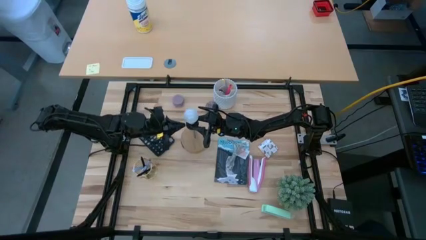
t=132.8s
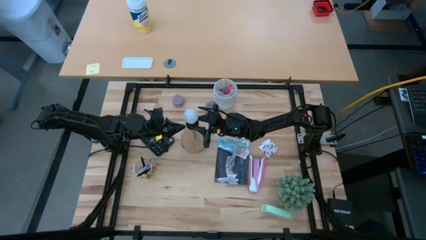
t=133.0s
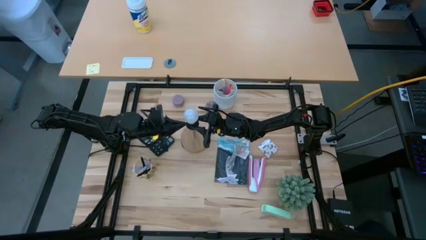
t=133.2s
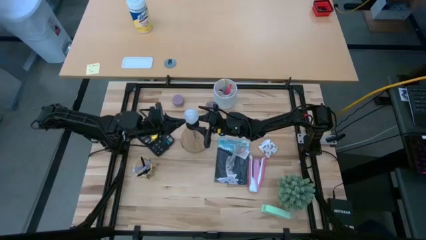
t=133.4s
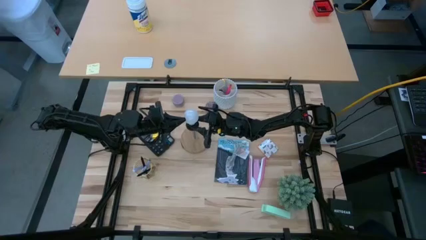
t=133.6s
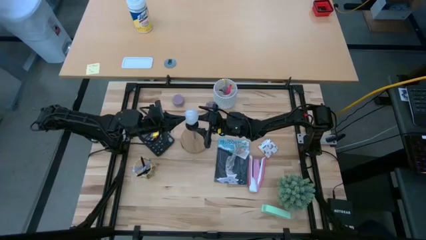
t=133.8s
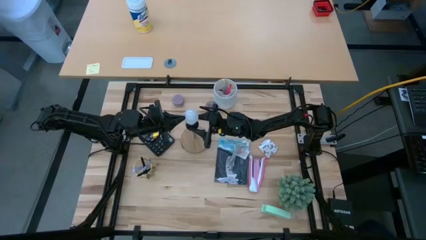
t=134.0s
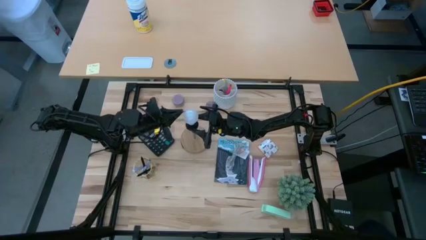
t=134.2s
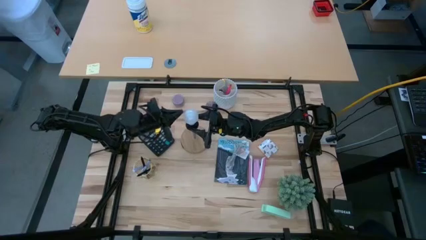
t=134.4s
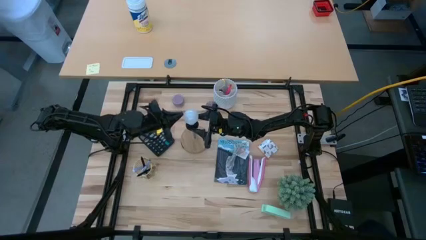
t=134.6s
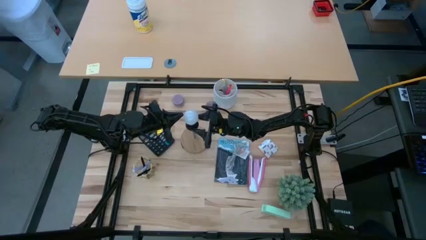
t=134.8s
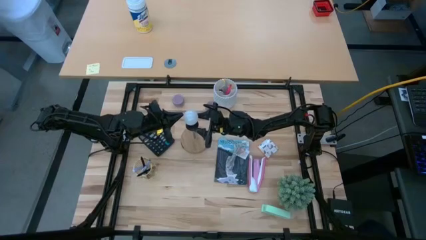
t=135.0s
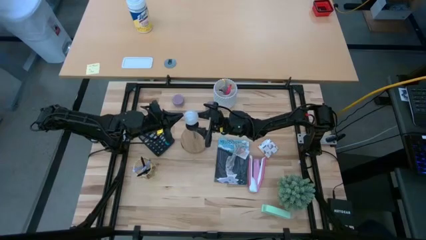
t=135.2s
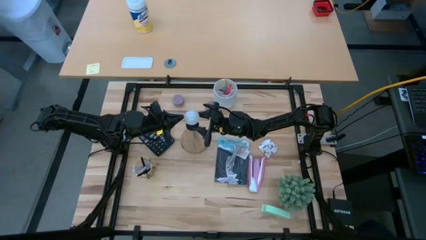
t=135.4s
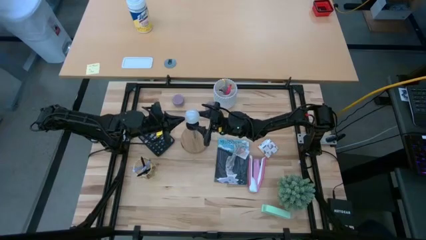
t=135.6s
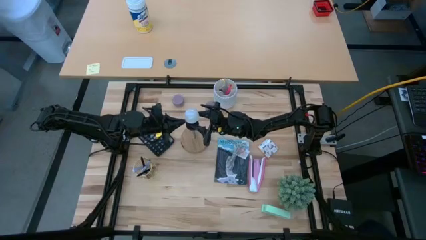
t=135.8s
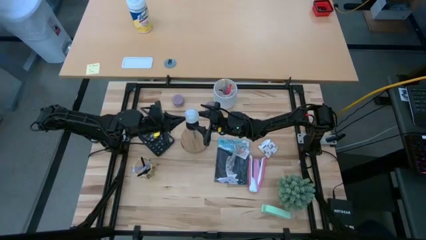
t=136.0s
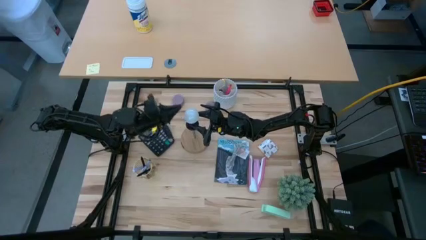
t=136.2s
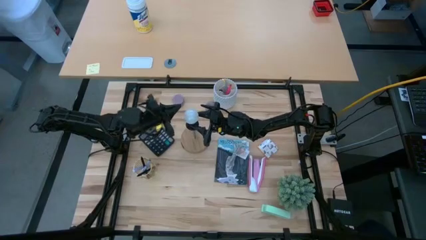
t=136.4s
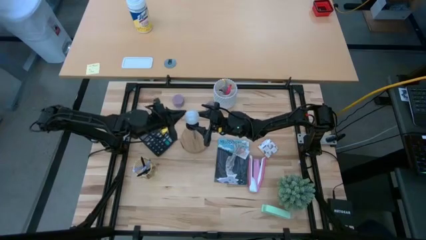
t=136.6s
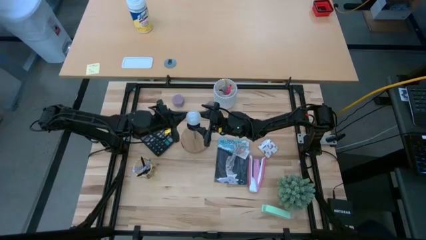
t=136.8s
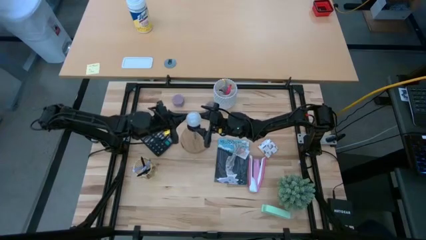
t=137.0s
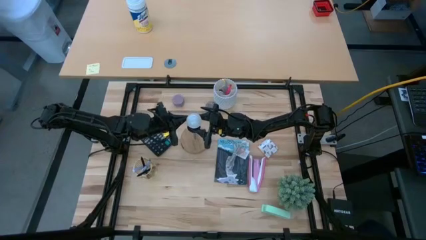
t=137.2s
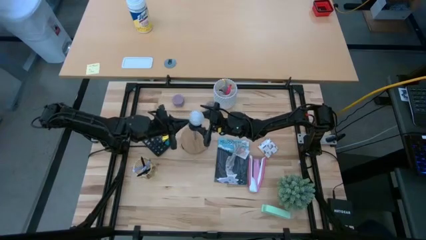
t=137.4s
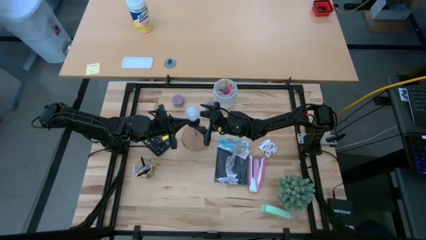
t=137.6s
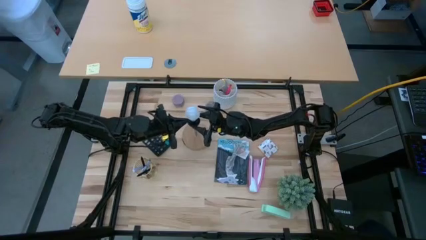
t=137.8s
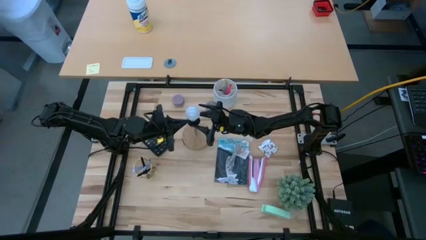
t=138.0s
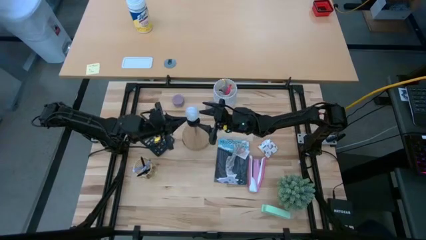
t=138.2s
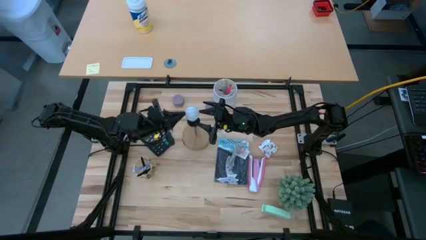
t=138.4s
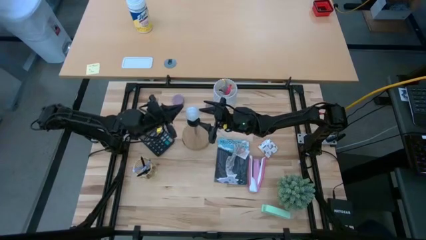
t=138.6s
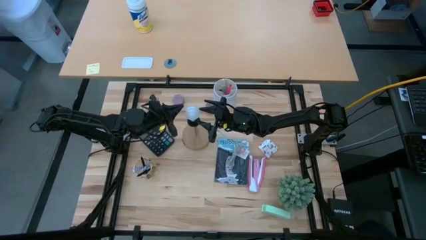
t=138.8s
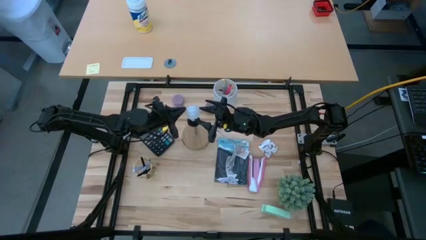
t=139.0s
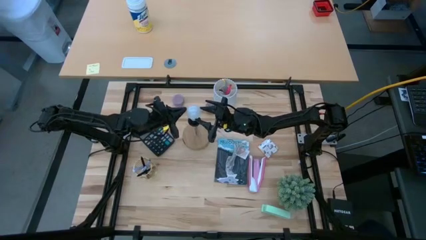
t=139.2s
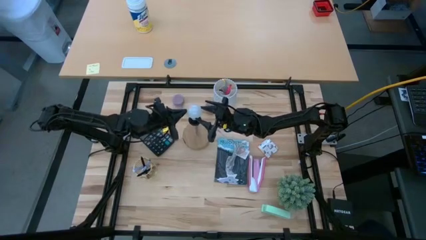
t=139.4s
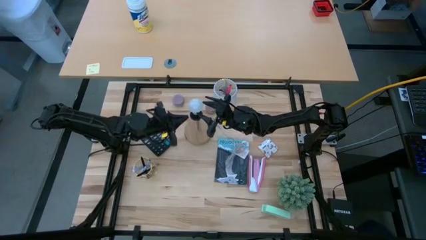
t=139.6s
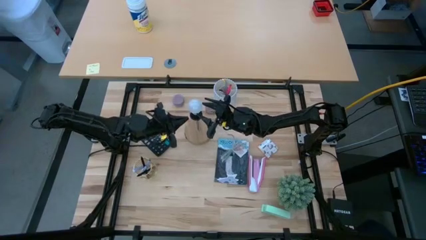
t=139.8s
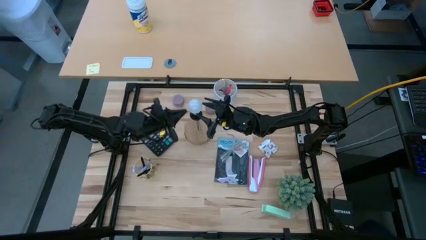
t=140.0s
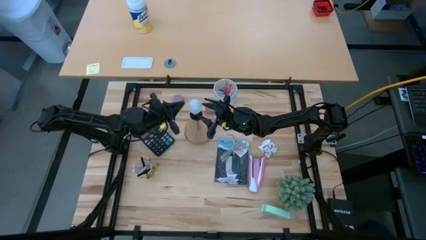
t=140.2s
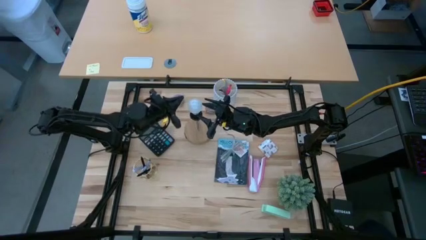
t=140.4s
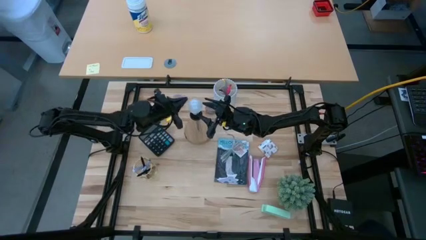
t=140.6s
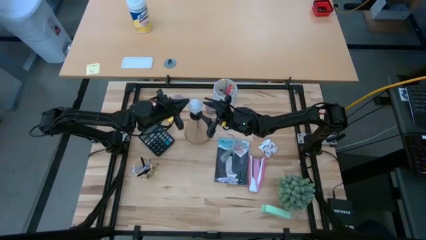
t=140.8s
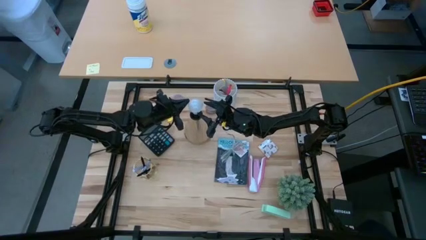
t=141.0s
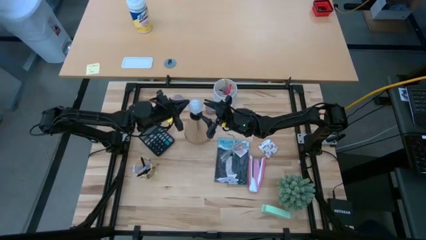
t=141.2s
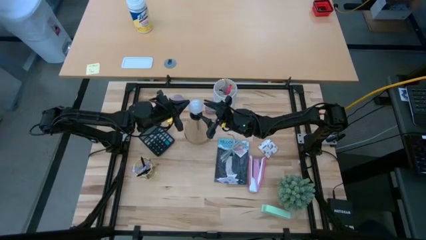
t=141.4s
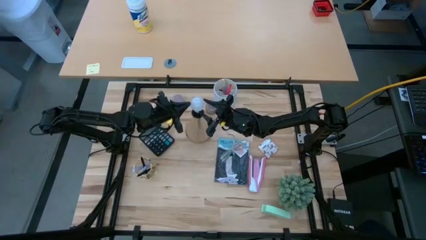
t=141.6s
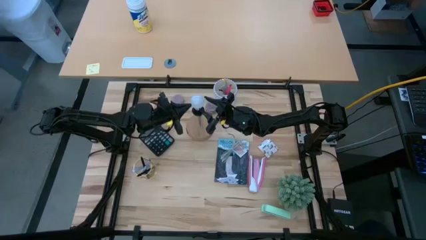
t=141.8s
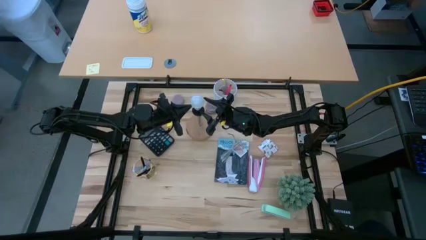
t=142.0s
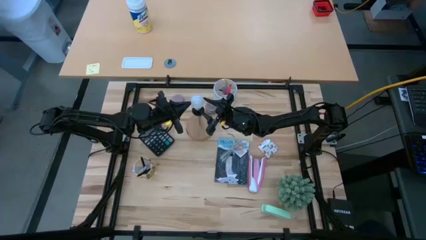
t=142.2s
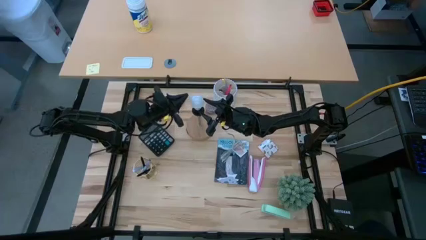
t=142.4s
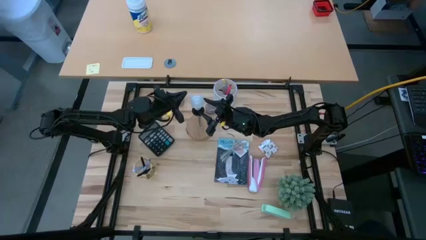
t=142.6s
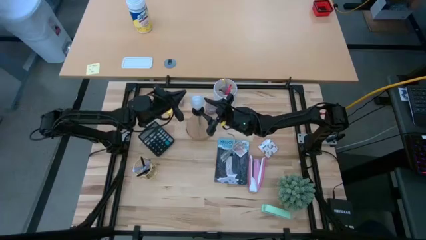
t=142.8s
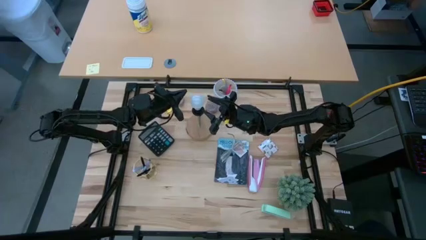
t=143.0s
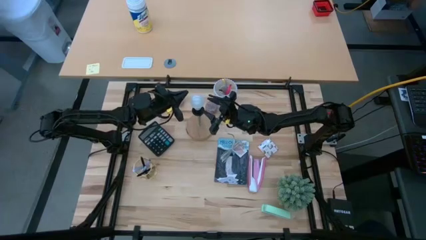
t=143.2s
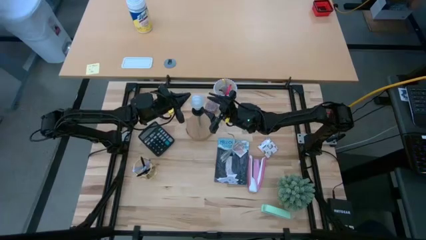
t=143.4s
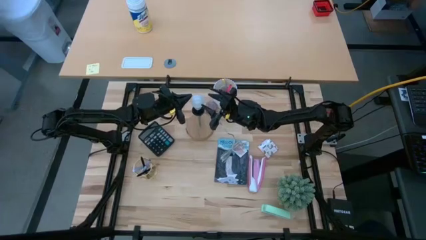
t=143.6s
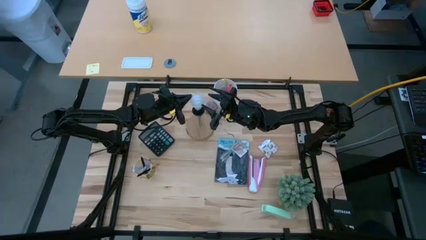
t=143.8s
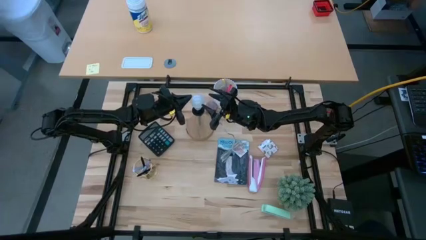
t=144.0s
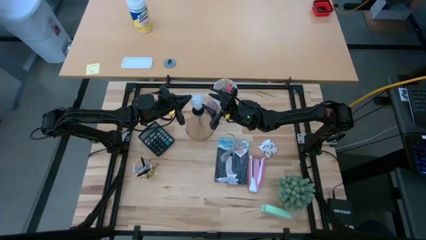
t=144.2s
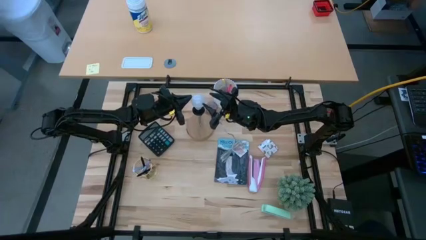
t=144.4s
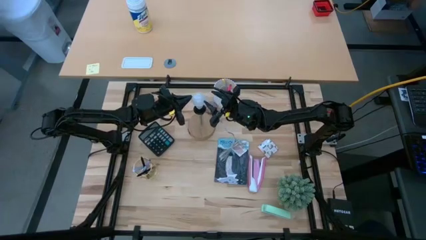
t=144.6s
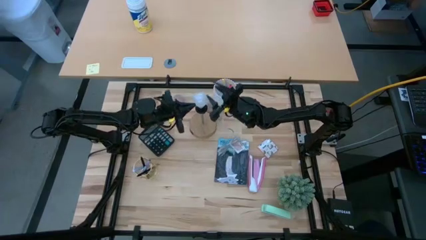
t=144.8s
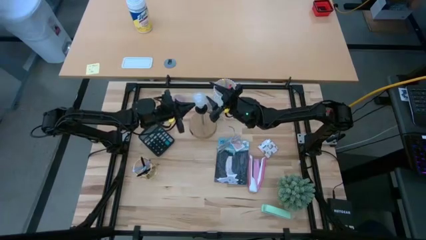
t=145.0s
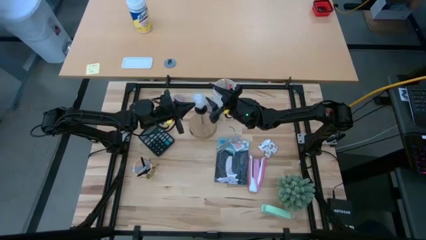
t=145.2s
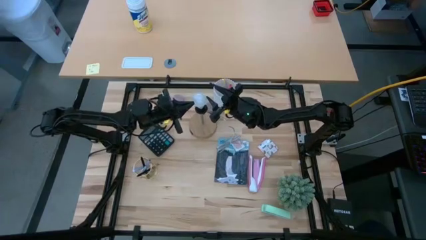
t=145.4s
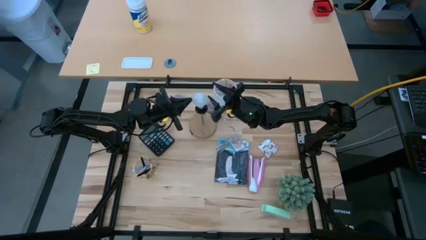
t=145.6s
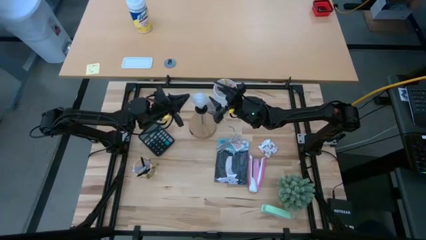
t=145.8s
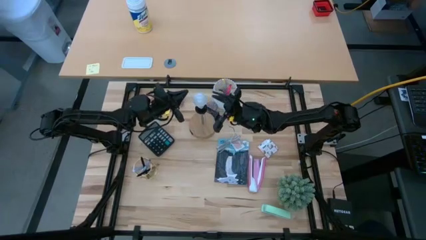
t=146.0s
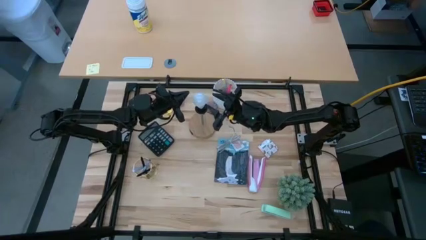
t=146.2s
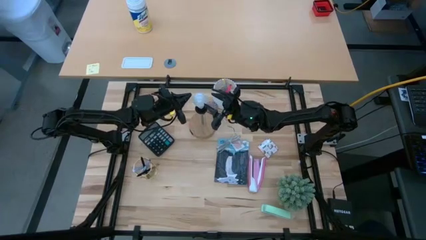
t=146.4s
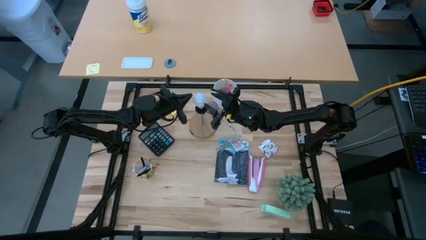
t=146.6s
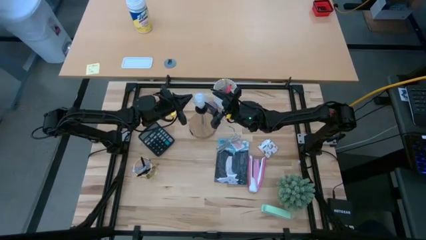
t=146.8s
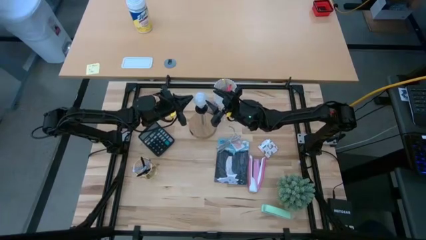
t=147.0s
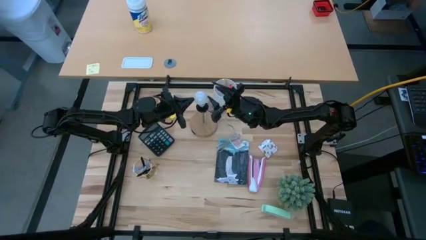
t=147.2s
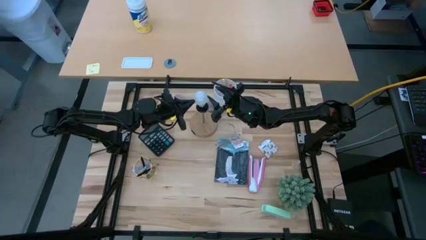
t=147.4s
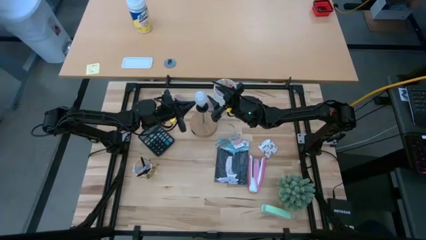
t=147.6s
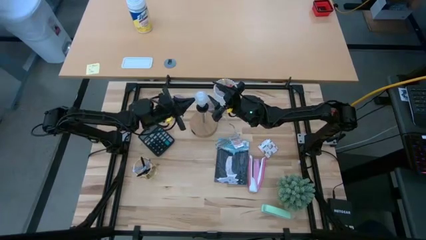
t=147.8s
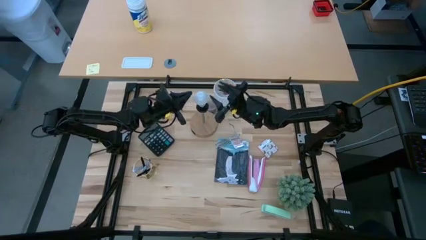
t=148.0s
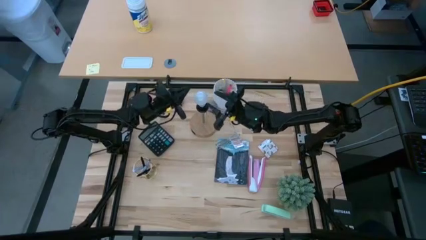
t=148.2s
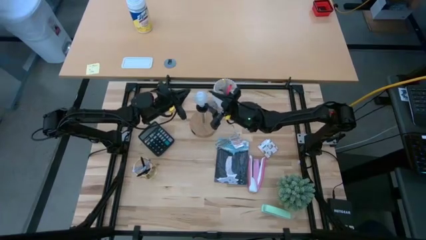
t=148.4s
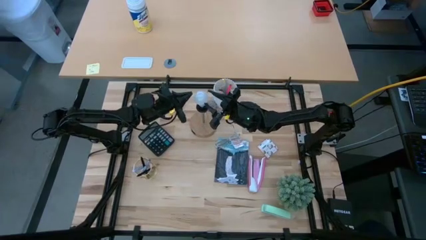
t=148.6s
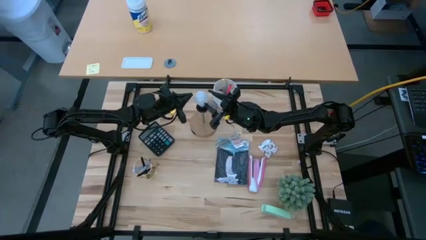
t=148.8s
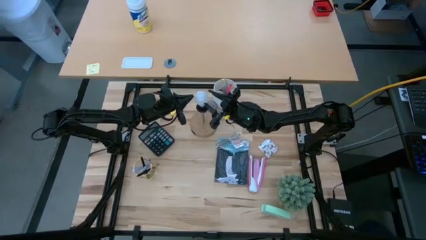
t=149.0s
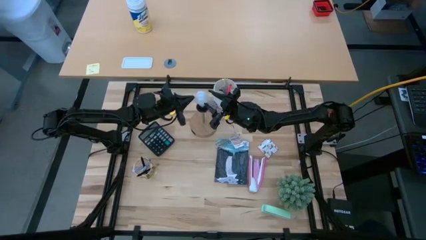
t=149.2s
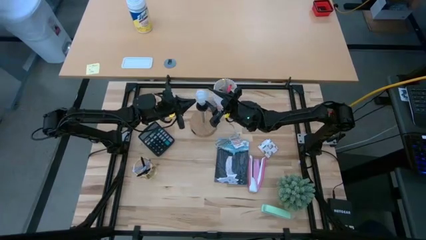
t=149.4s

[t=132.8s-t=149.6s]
Task: Screw lightbulb
Remove the lightbulb from the lamp
